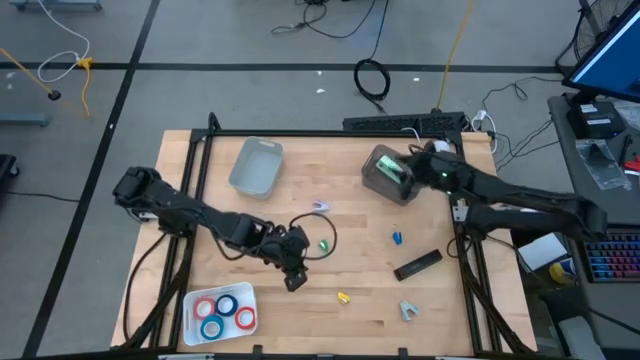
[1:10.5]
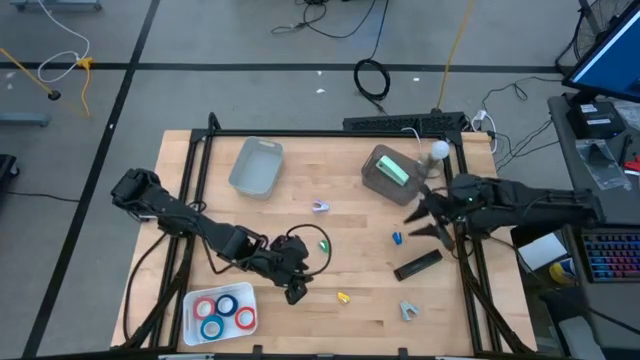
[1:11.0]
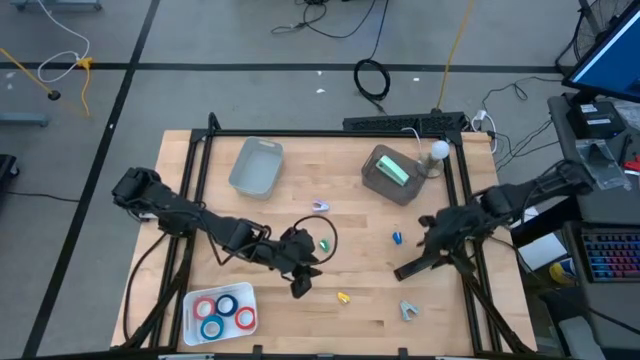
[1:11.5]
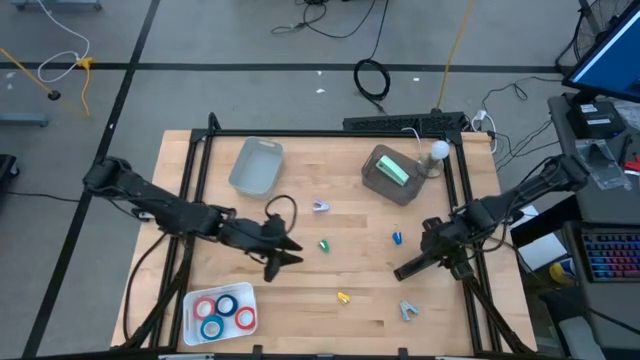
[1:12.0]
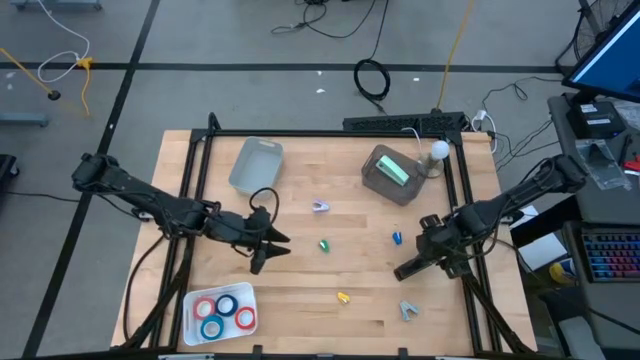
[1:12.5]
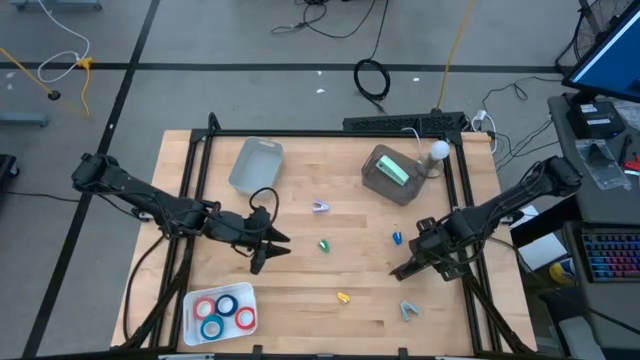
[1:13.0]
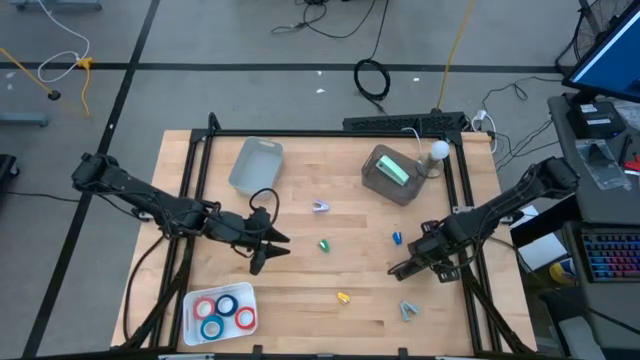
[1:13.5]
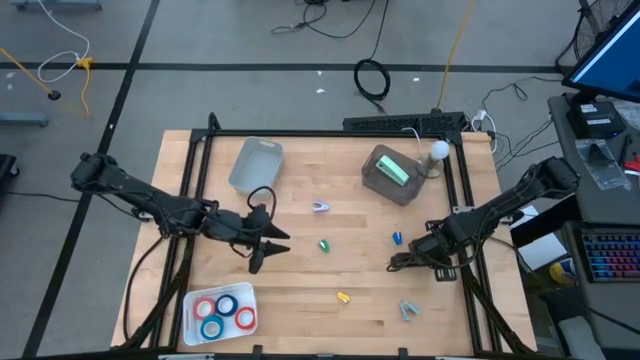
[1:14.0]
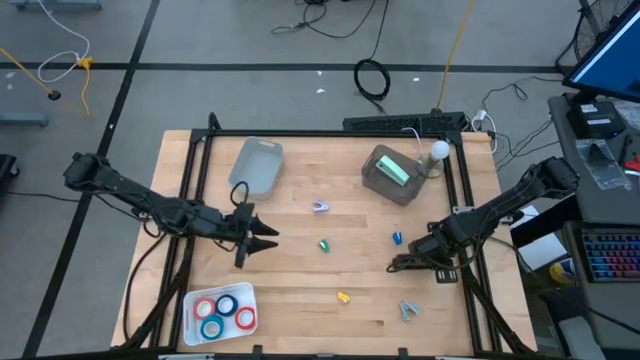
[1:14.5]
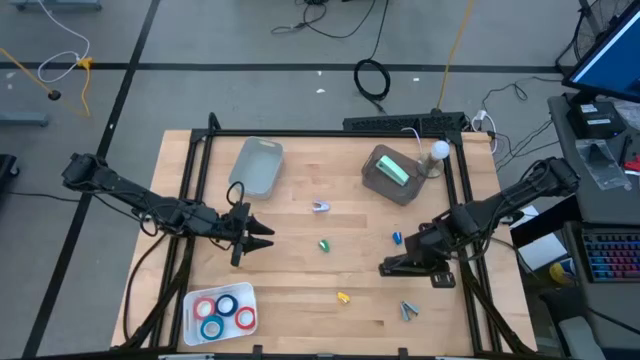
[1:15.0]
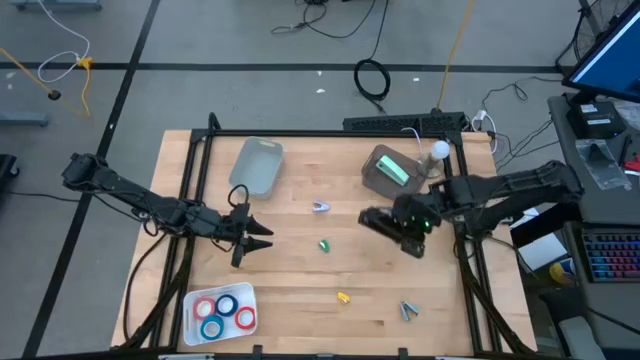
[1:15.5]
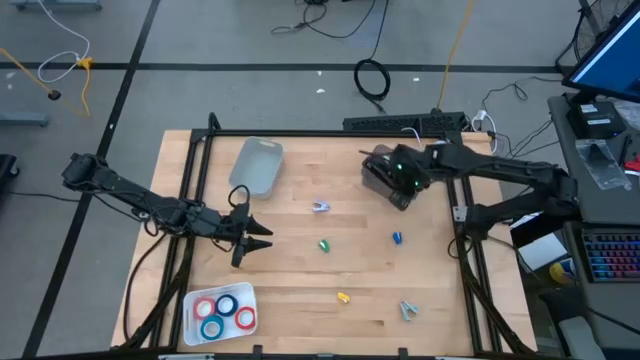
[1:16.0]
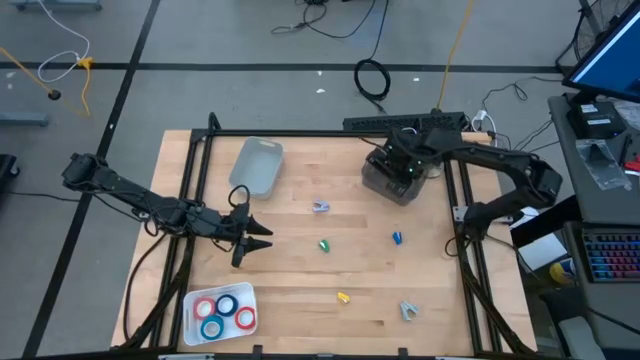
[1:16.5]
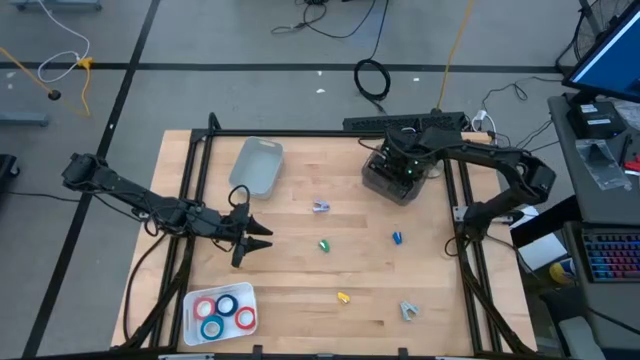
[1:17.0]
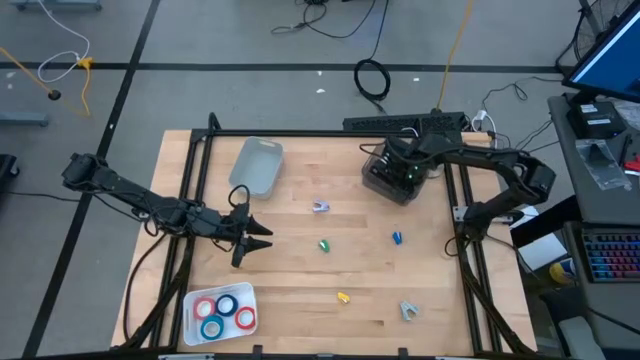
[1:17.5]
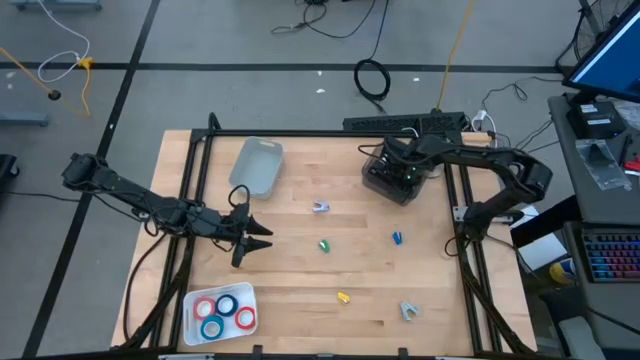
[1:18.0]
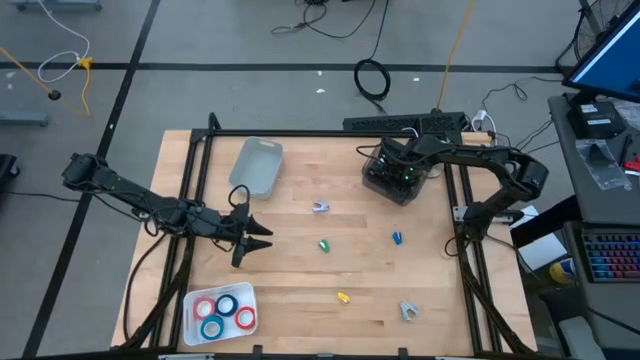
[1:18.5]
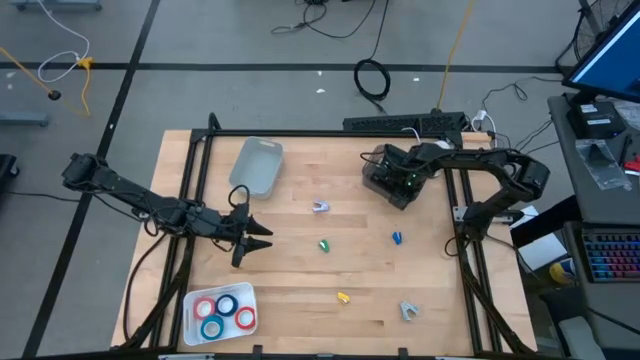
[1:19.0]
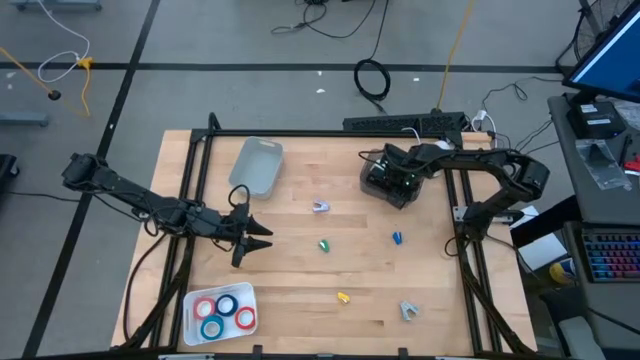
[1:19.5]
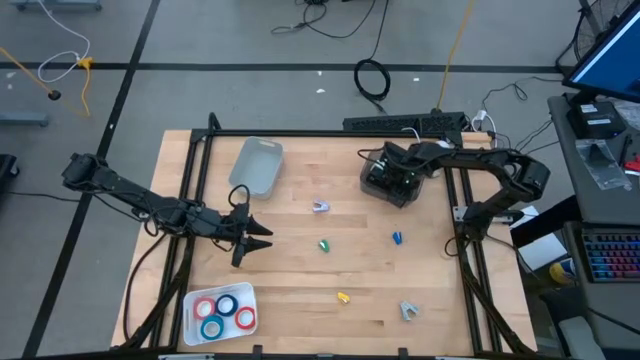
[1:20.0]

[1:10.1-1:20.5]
Task: Pick and place Stapler, Stapler remover, tape
Put the black stapler into the black bin

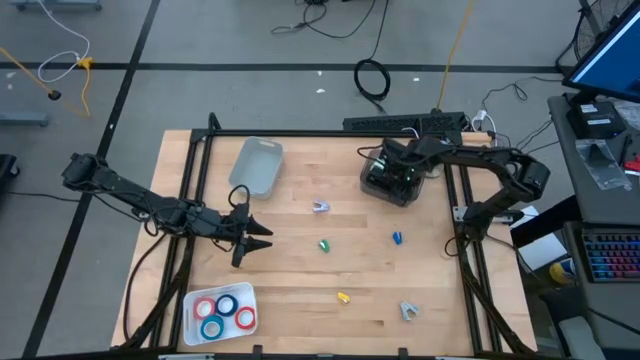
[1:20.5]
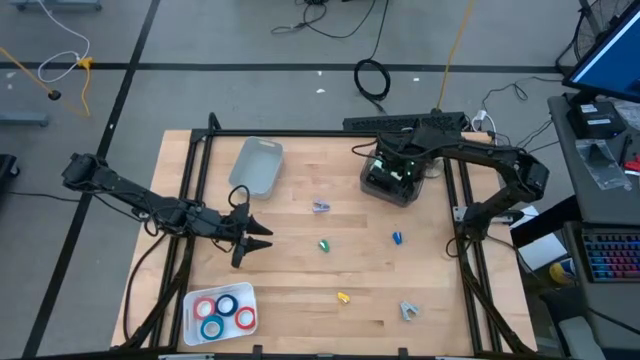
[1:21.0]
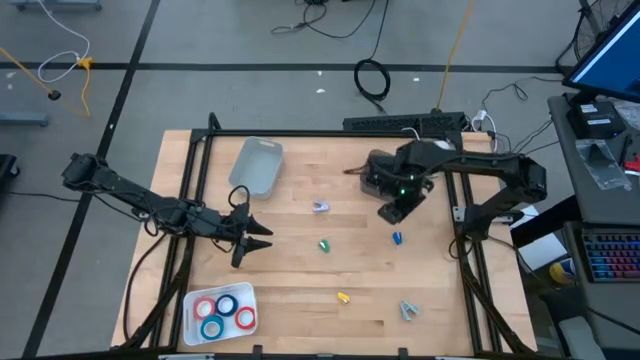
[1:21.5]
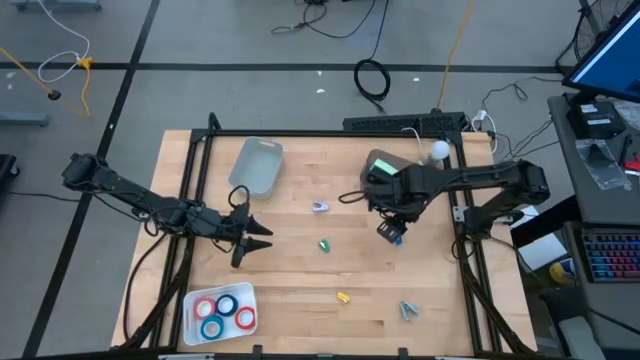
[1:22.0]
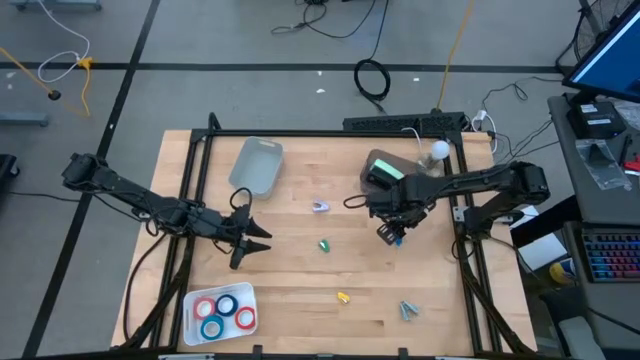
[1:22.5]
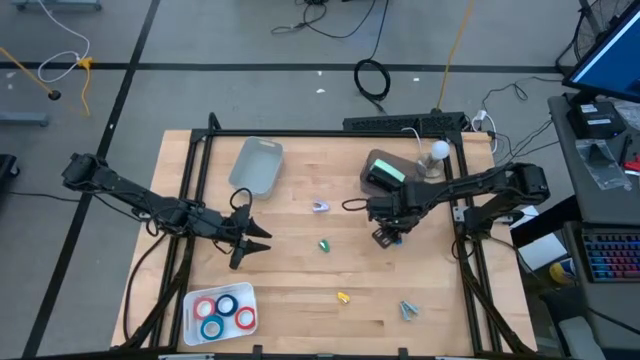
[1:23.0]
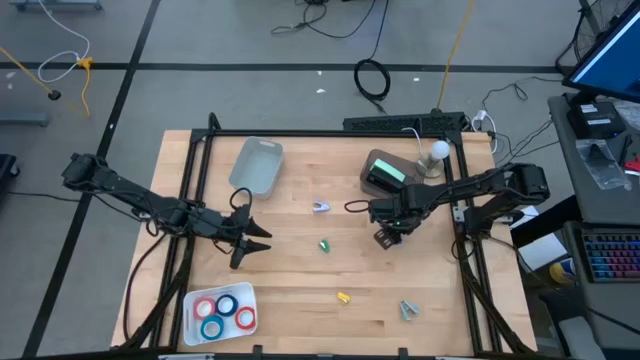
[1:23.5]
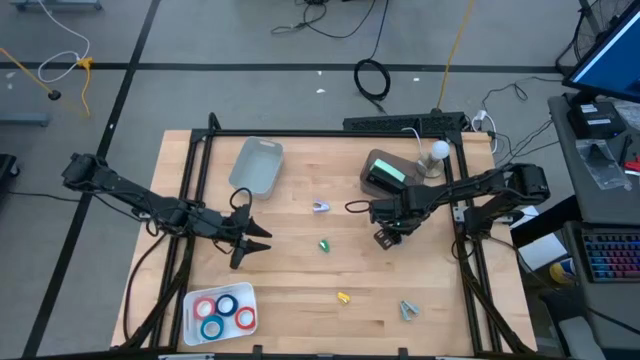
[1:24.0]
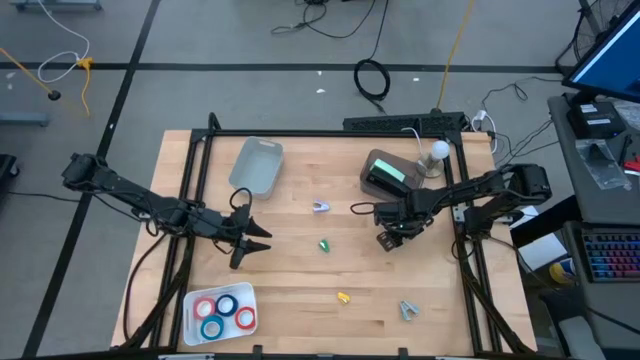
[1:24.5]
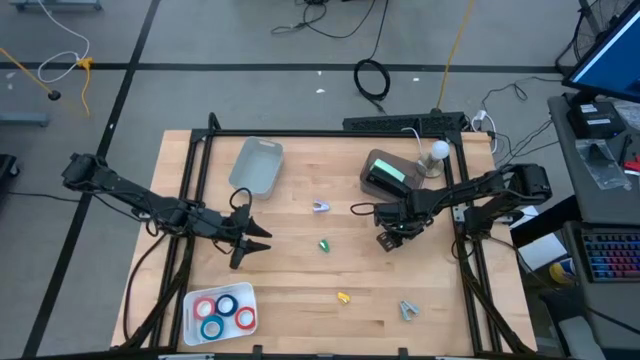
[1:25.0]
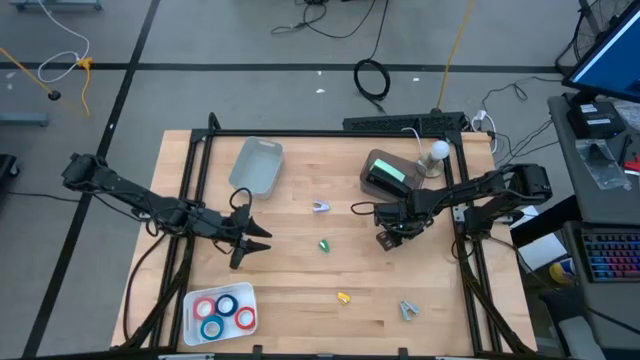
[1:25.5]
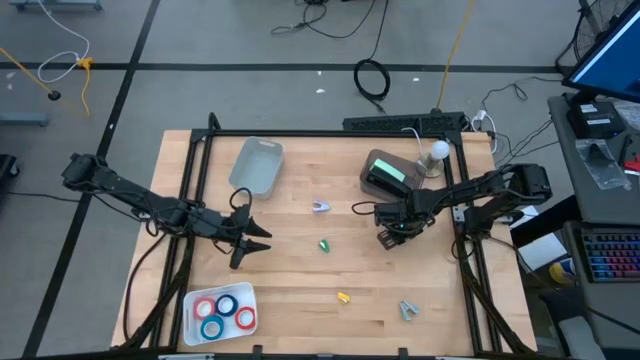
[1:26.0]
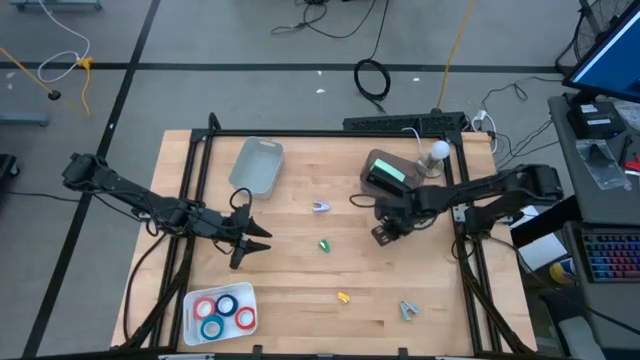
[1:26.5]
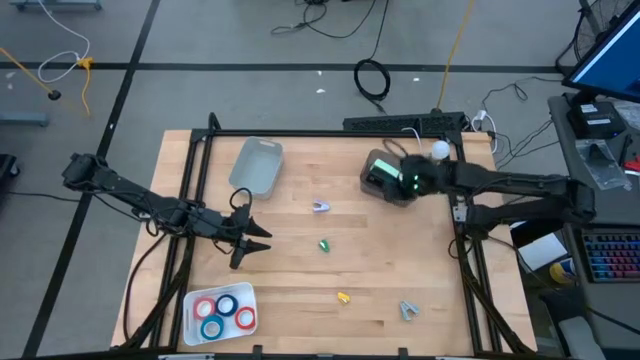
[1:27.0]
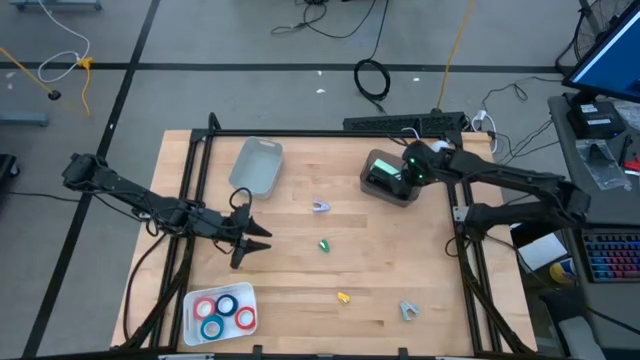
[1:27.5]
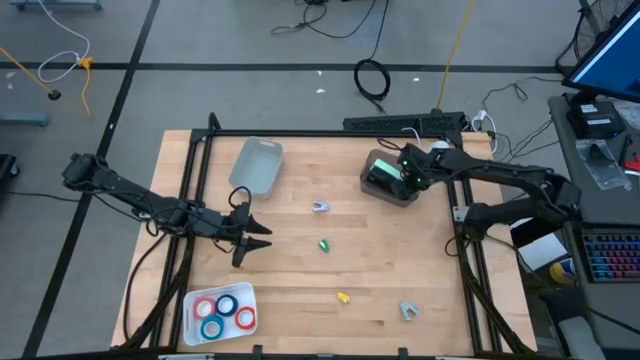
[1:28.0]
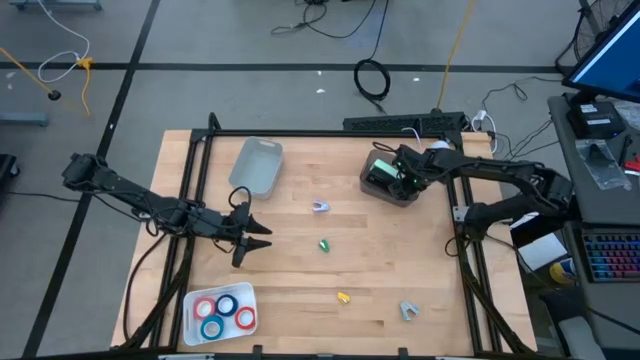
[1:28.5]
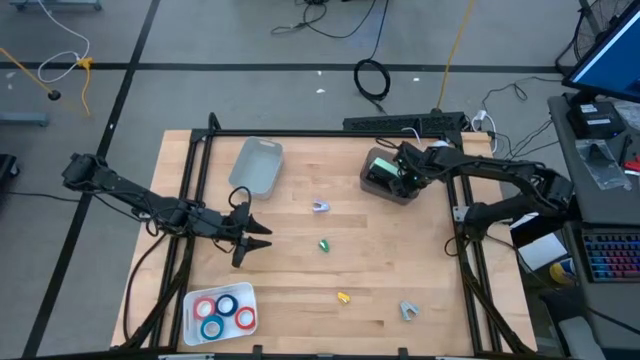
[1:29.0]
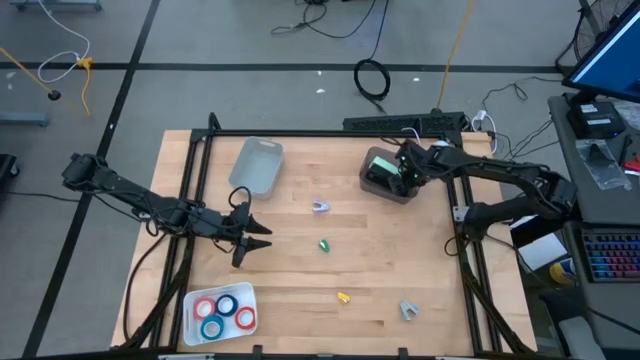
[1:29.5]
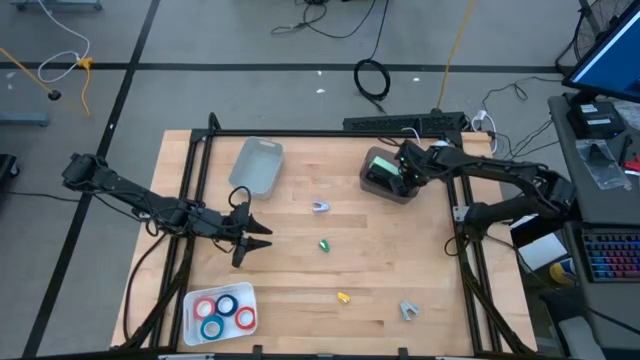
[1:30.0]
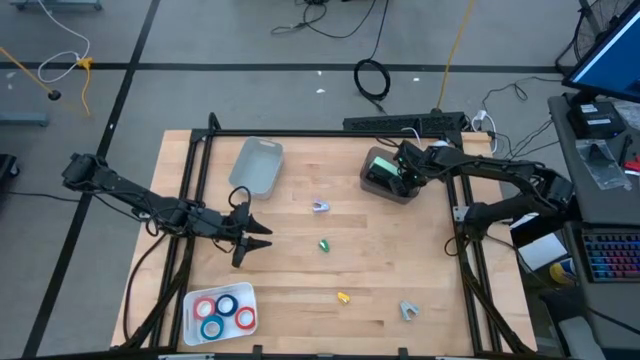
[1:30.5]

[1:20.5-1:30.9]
Put the blue small stapler into the black bin

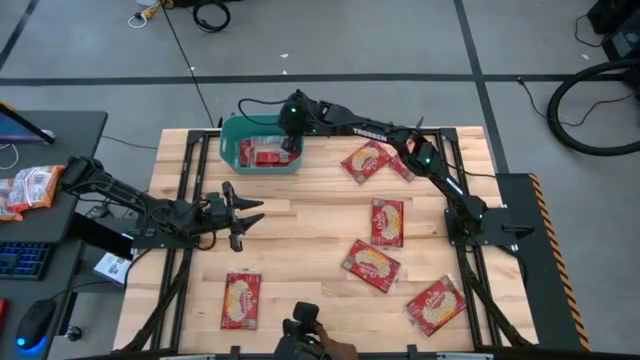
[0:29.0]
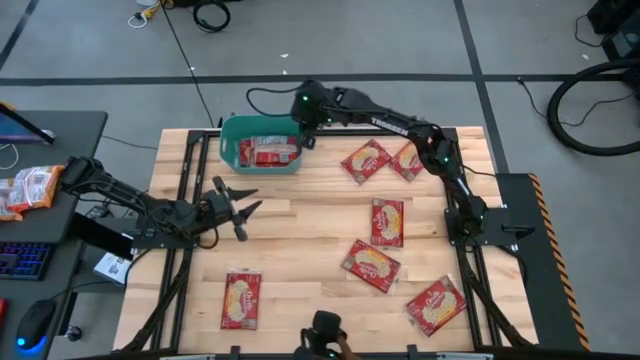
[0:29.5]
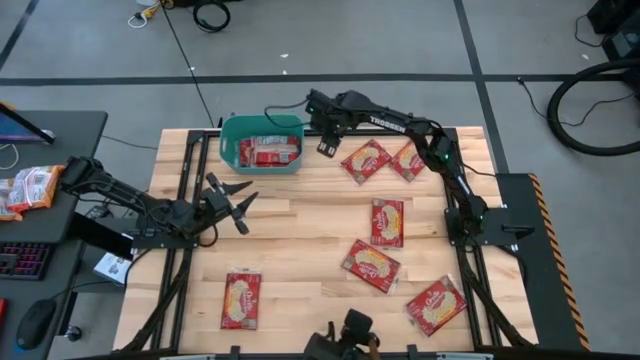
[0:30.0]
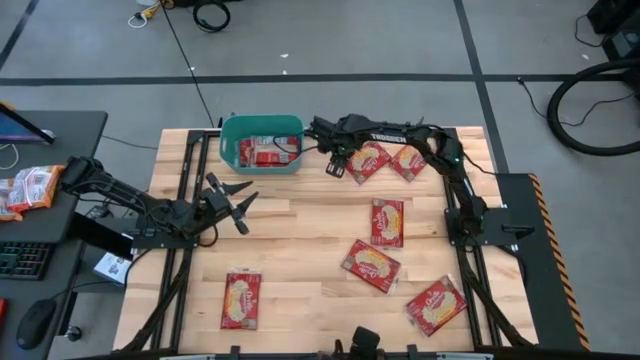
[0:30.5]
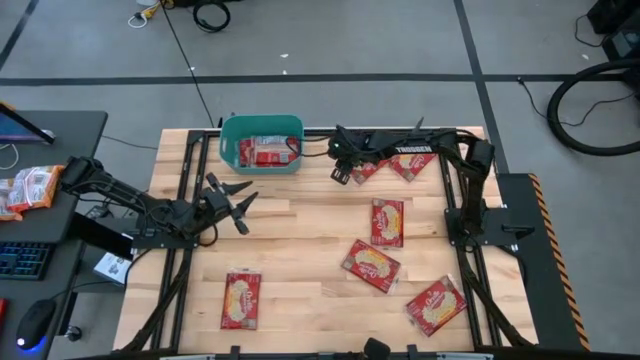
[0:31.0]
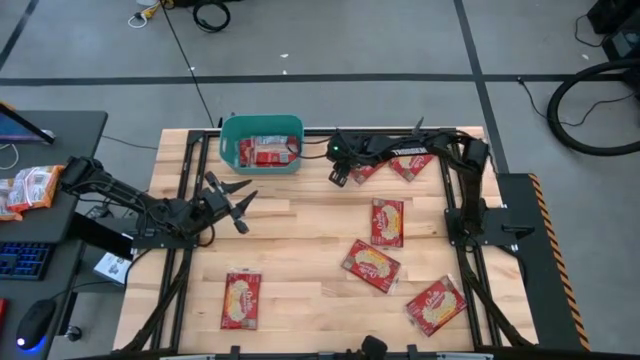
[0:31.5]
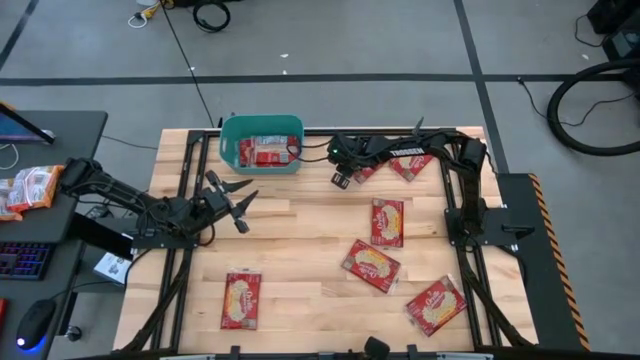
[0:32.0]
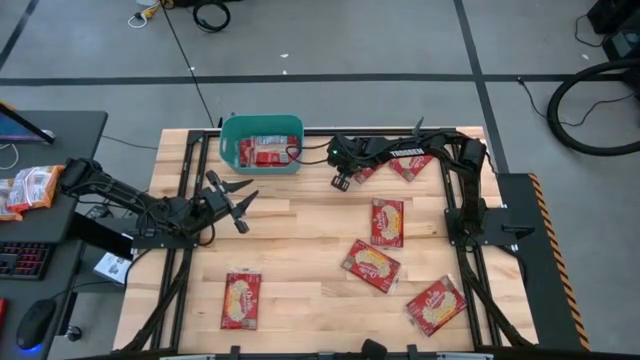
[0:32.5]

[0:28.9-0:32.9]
Task: Sort popcorn bags into baskets
Put the popcorn bag into the blue bin
